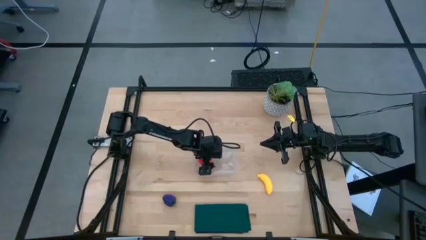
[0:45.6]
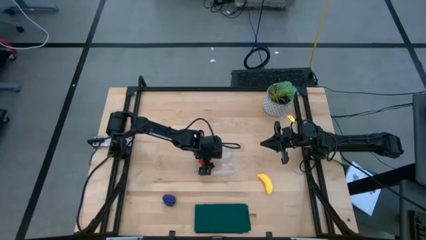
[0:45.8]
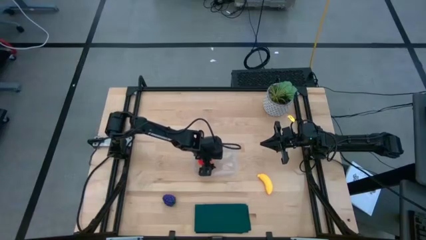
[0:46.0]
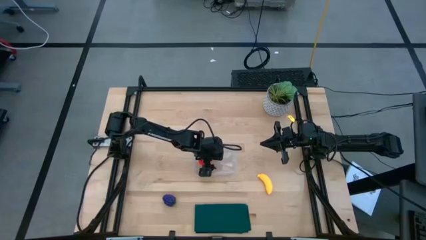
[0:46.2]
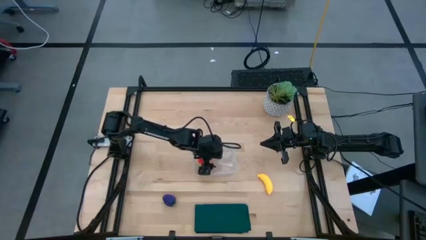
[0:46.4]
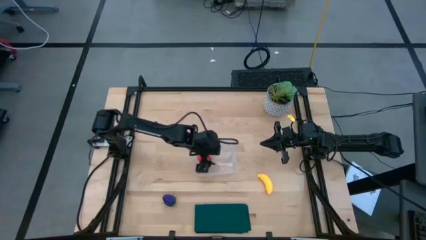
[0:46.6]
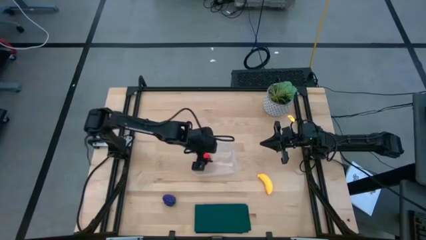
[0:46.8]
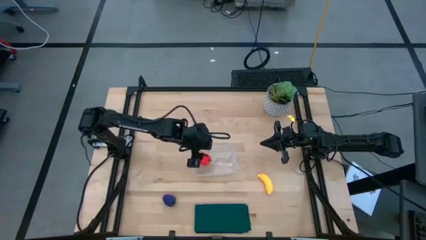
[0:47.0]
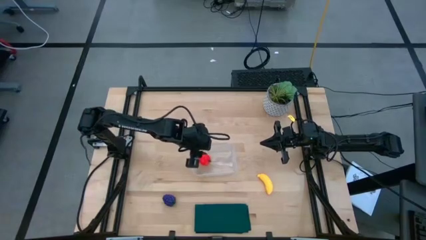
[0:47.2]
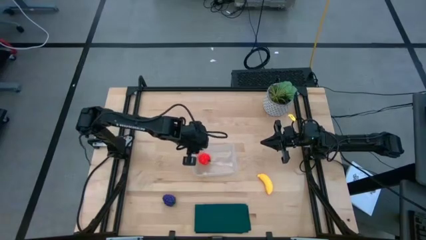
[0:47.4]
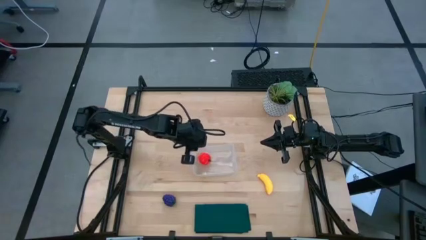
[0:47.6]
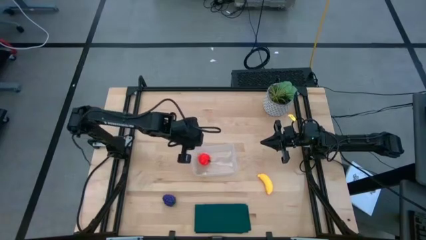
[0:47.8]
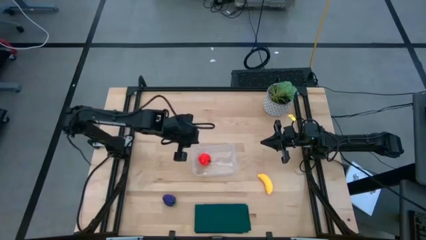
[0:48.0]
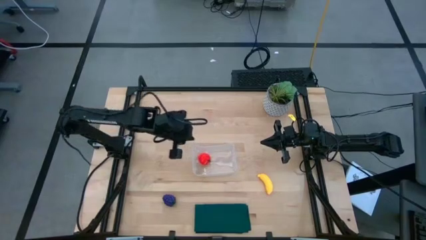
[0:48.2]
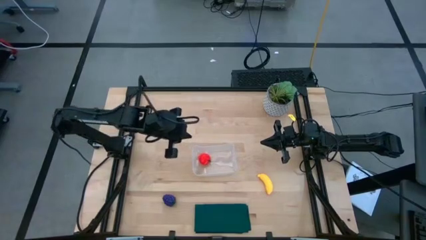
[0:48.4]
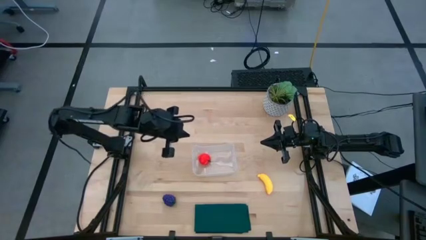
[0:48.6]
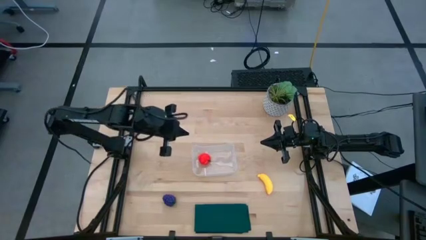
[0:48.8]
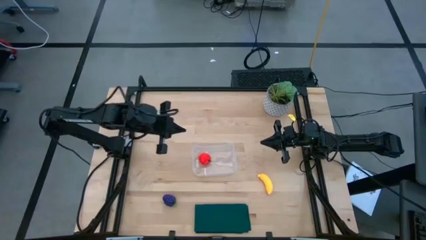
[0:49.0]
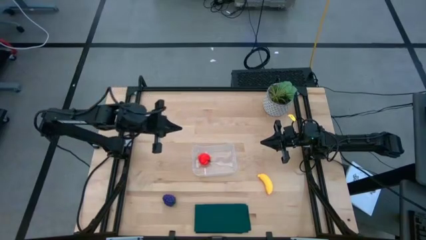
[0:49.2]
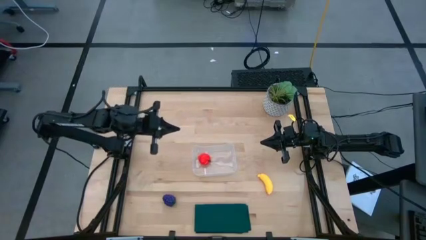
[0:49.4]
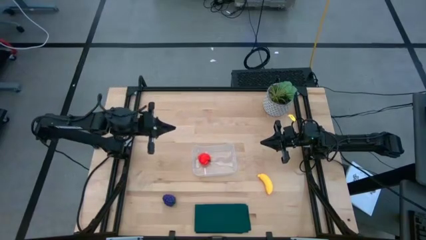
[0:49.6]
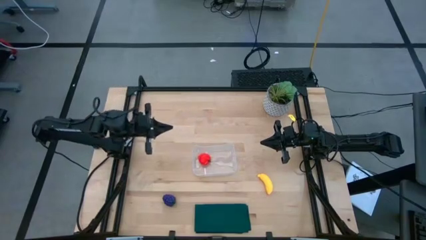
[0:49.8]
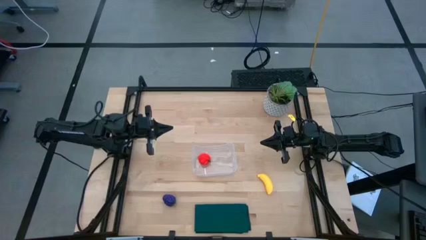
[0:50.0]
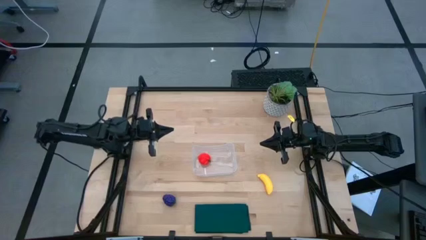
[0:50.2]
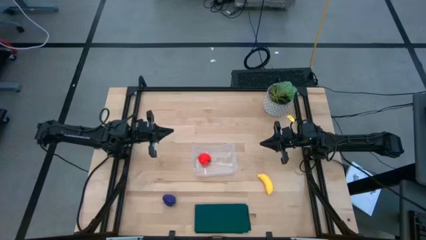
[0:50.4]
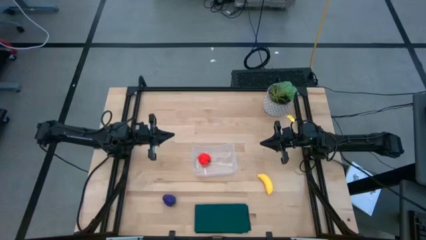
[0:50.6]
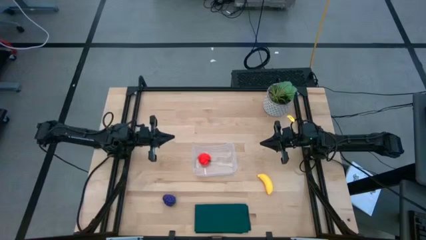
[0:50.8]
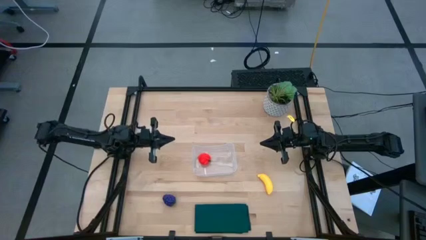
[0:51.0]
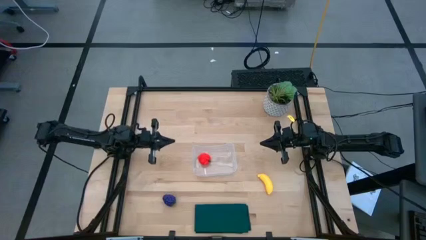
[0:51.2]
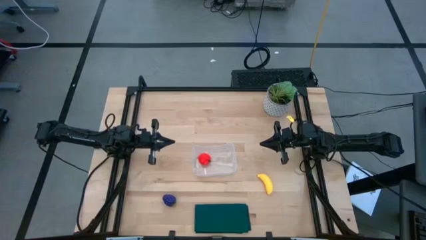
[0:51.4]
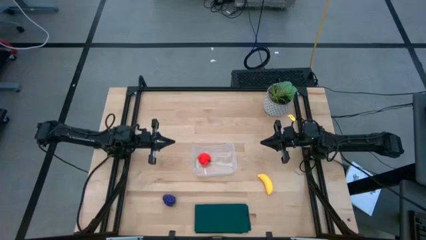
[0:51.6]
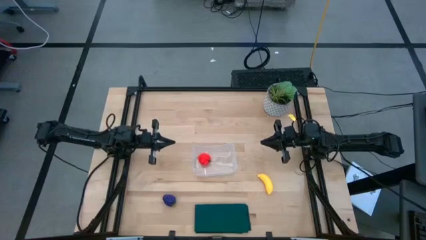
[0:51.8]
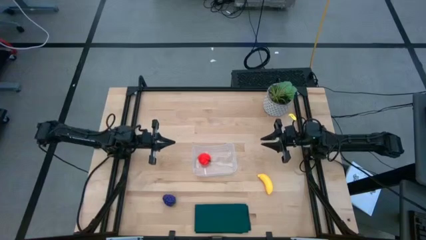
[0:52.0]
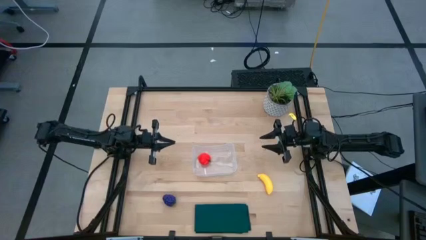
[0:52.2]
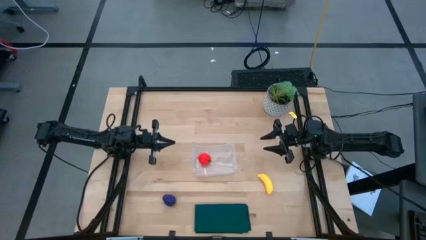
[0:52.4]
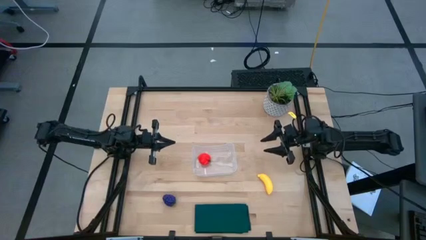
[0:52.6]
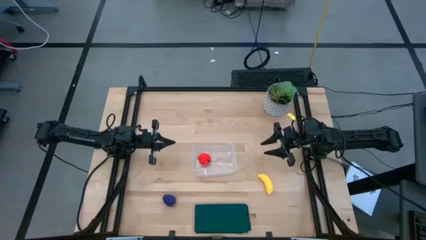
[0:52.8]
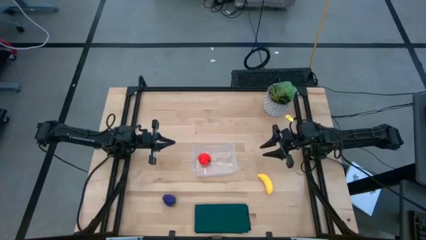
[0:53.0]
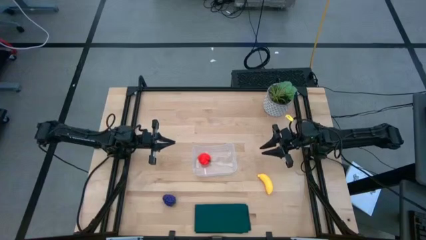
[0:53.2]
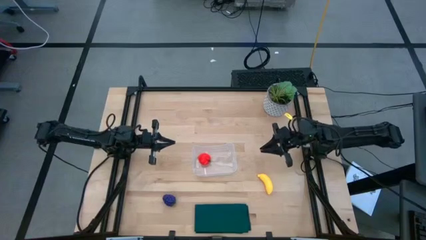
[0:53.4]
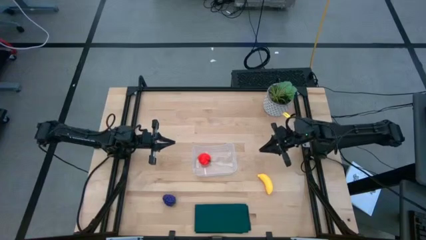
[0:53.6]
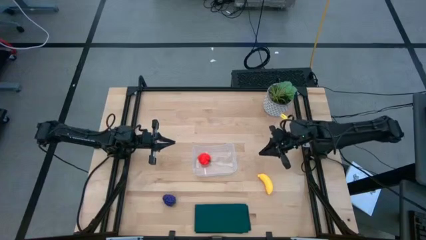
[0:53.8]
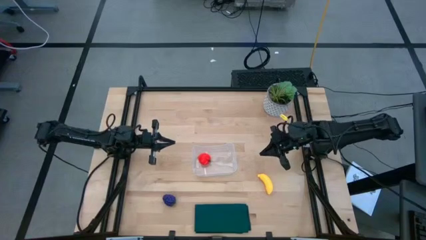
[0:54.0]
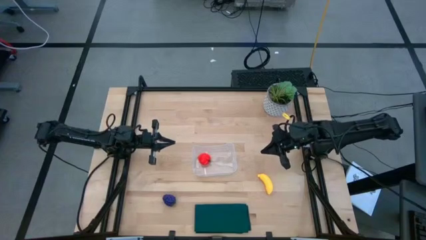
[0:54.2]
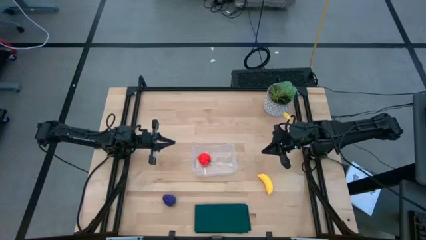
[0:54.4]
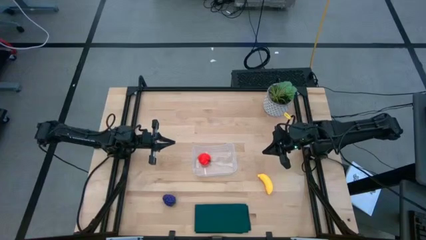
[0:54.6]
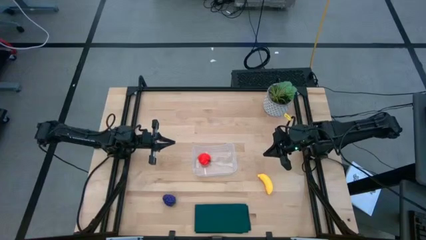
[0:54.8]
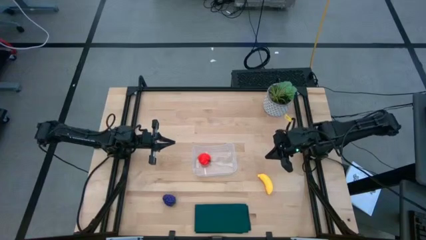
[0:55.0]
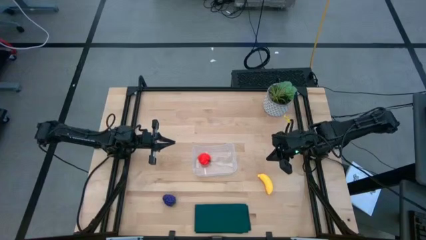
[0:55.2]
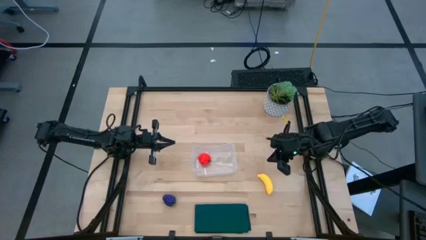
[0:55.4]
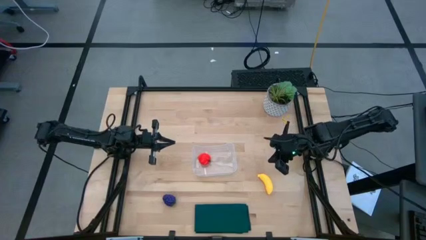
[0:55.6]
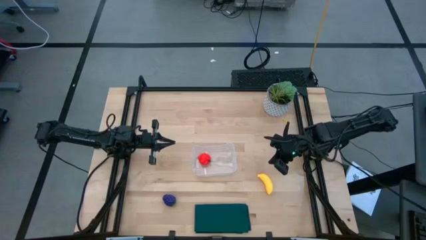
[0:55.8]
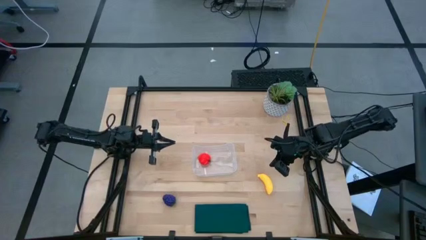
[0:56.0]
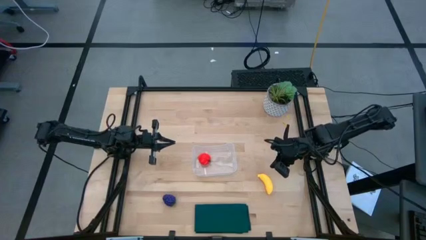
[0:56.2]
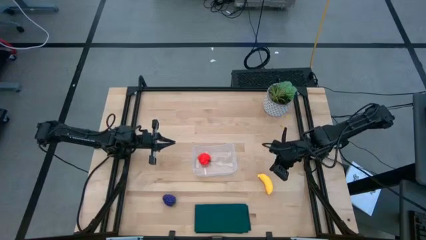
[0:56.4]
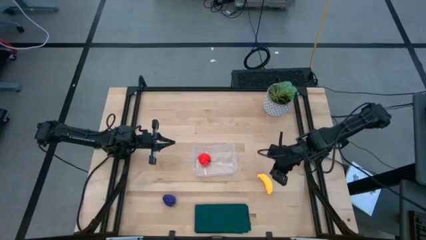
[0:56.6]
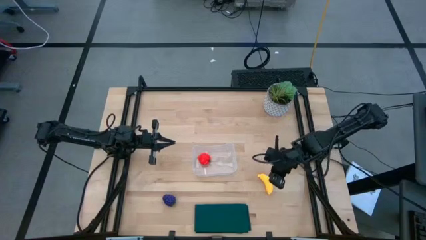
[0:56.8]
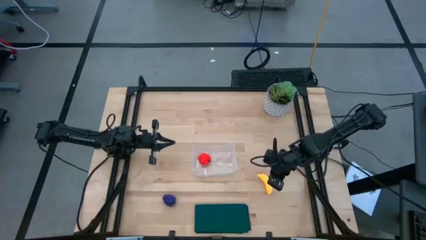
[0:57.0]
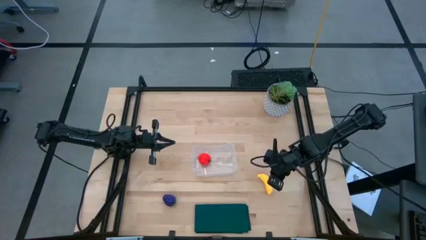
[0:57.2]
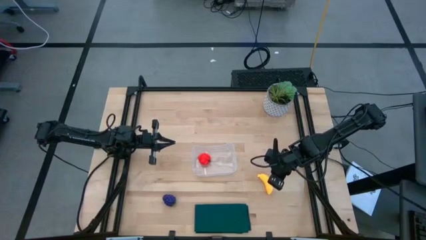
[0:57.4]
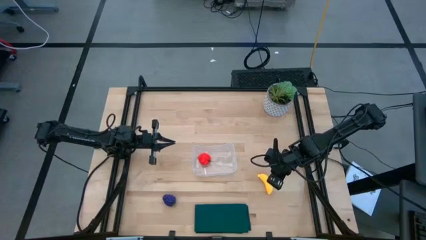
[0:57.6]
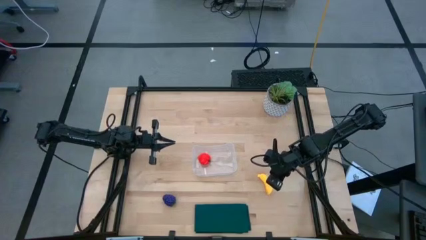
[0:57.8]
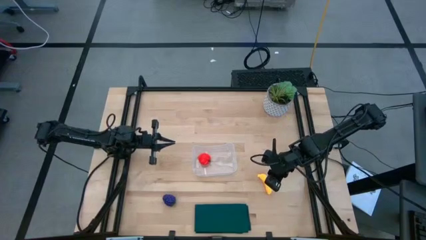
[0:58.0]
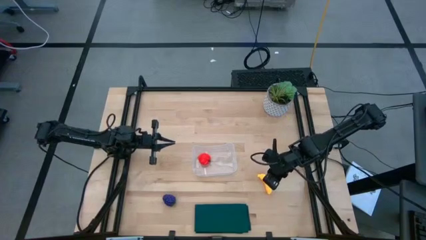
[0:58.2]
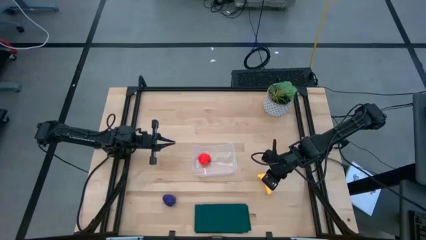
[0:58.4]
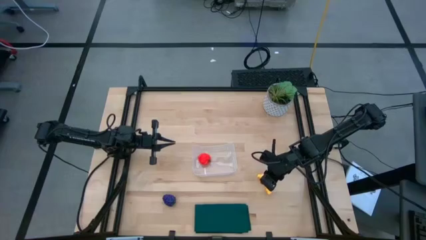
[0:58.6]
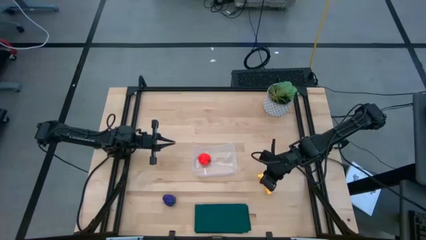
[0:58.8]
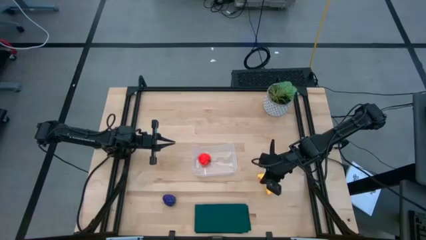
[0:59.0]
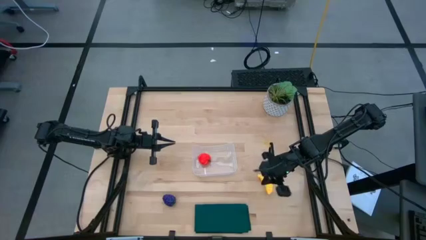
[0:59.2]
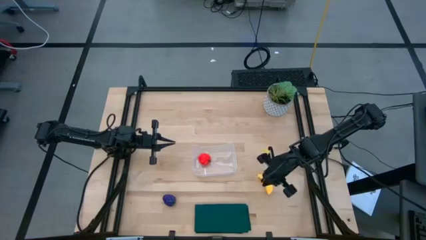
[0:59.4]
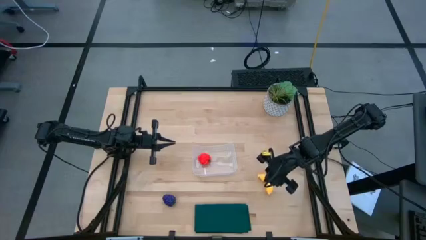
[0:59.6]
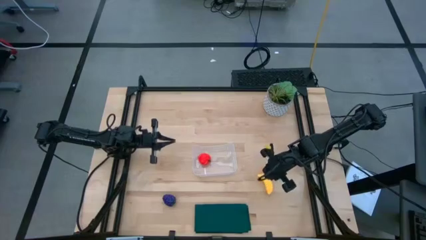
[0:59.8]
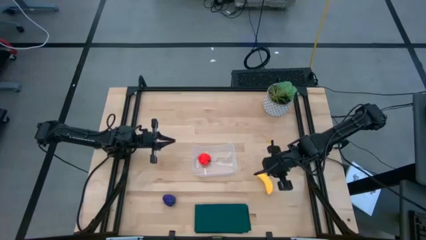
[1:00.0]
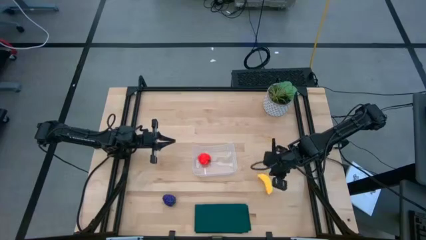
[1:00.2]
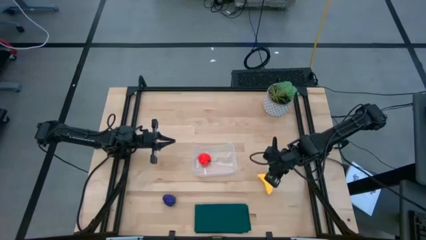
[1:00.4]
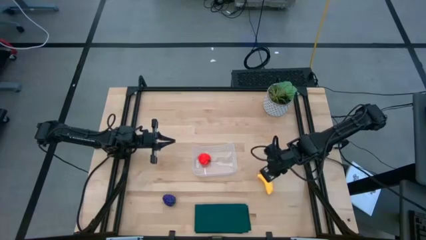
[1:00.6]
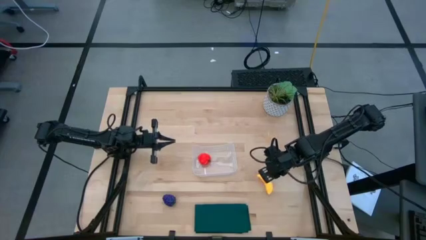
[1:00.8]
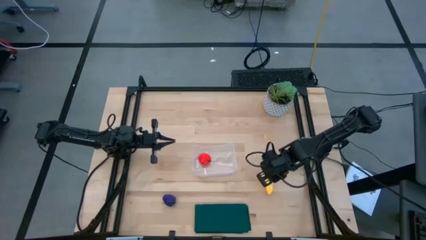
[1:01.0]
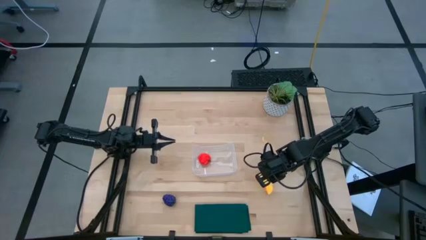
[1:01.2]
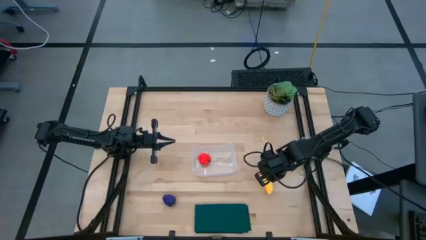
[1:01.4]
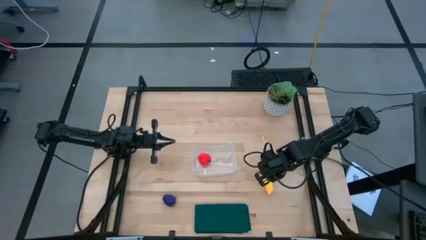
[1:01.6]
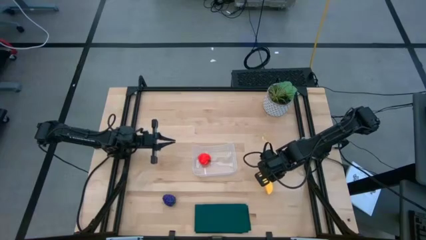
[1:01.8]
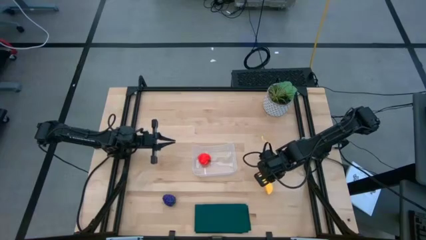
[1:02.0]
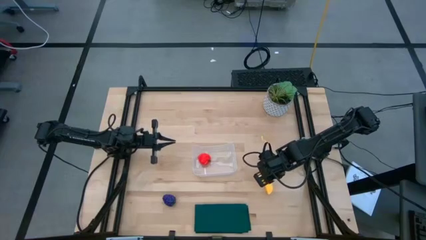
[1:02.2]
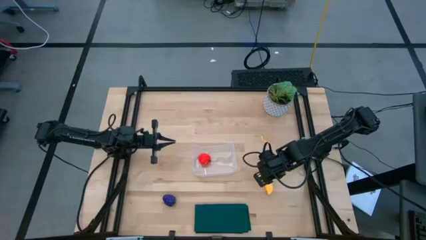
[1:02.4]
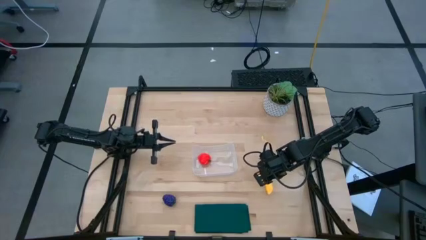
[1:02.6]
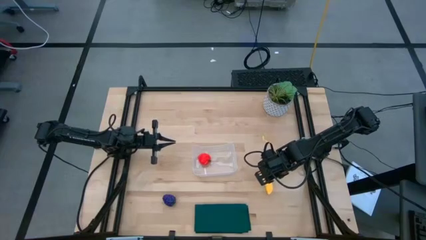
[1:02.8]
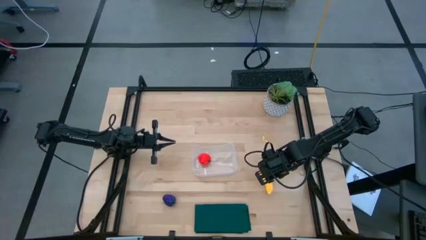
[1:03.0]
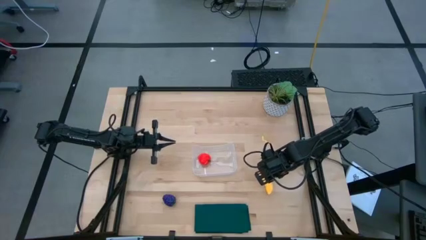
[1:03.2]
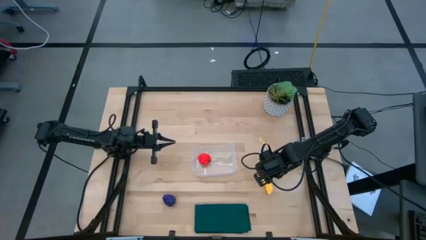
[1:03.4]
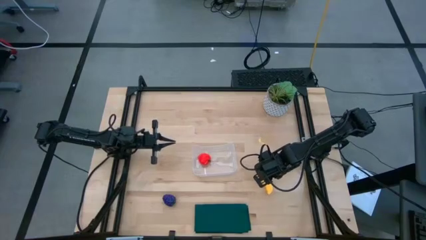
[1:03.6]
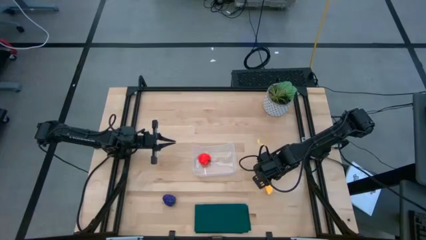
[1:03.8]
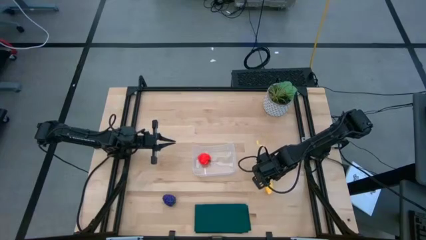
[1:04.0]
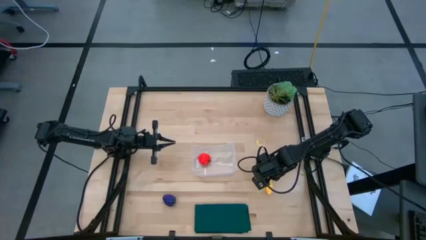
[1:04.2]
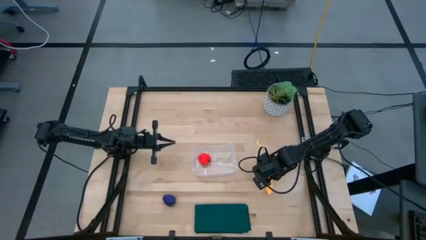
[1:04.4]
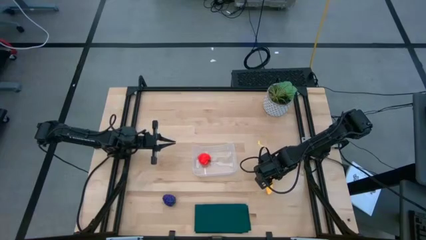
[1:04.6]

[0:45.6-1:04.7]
Task: Pick and placing Produce into tupperware
Put the yellow banana into the transparent bin
